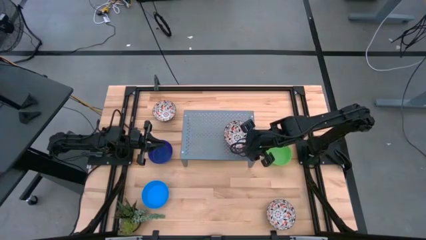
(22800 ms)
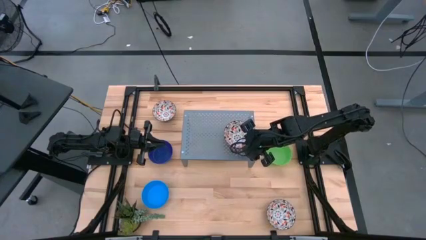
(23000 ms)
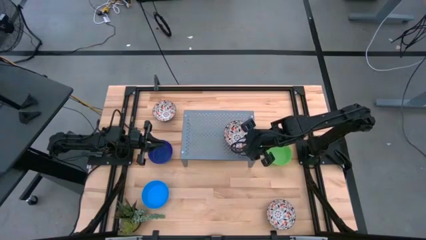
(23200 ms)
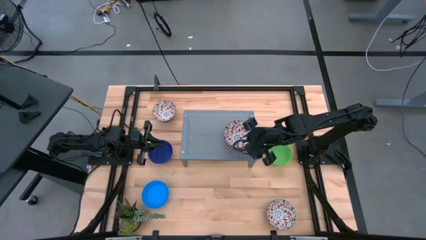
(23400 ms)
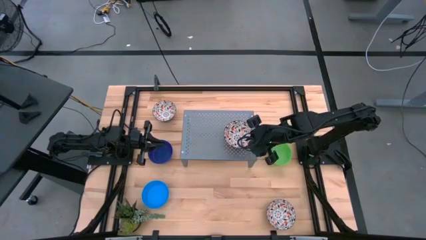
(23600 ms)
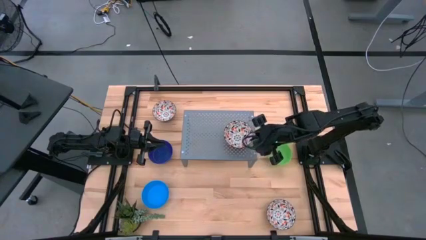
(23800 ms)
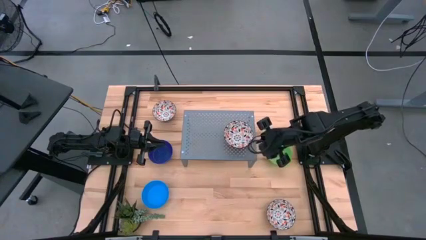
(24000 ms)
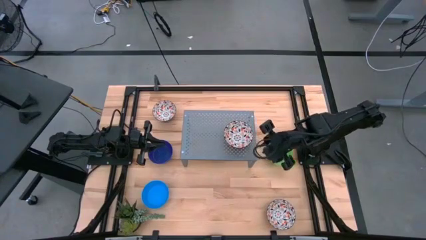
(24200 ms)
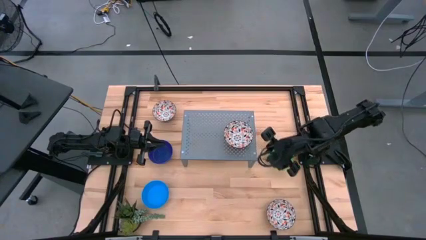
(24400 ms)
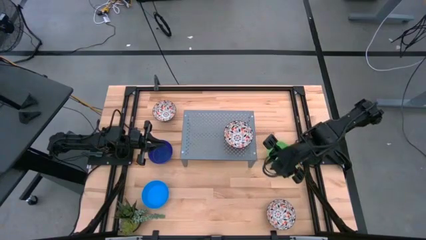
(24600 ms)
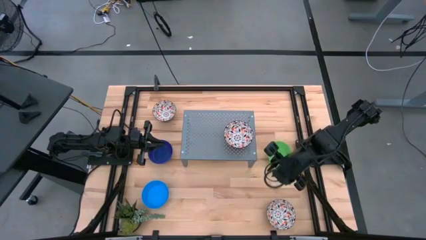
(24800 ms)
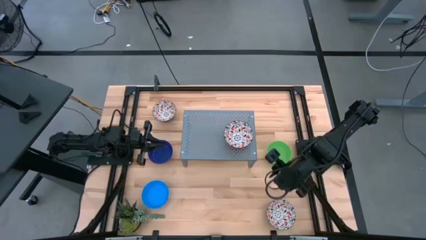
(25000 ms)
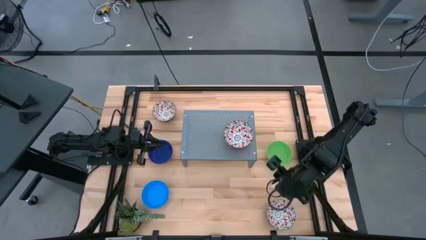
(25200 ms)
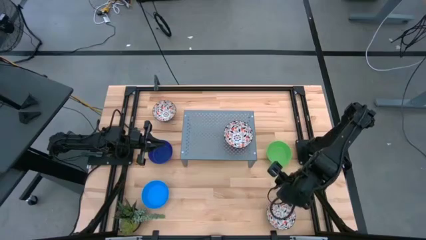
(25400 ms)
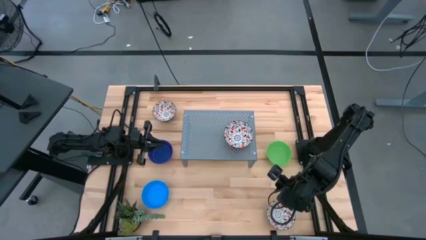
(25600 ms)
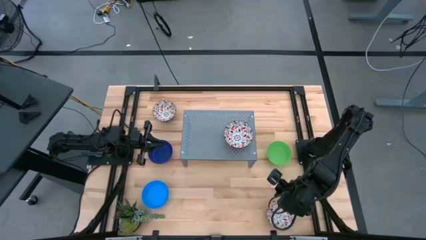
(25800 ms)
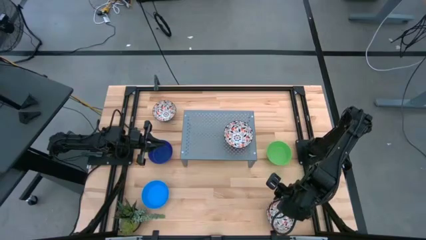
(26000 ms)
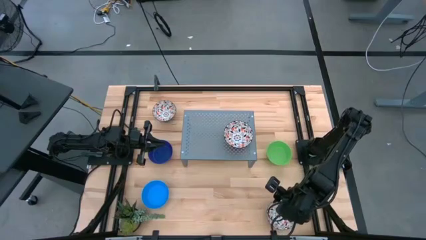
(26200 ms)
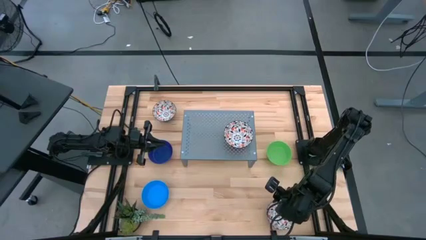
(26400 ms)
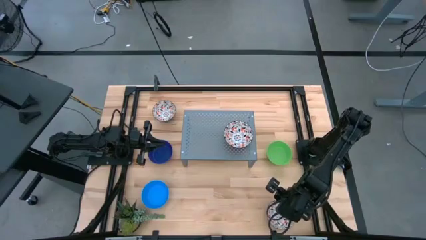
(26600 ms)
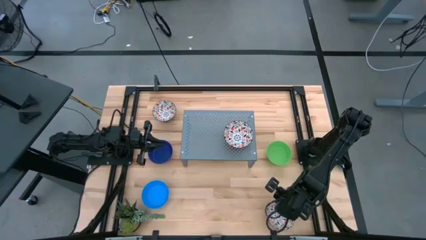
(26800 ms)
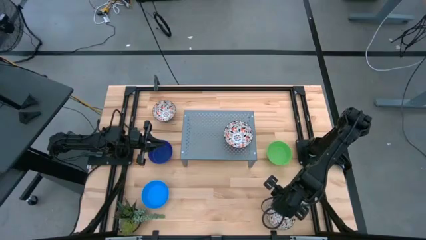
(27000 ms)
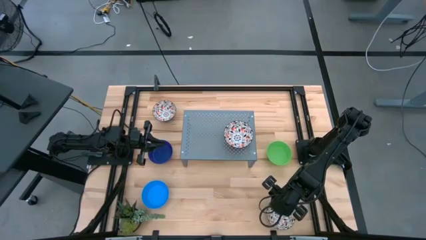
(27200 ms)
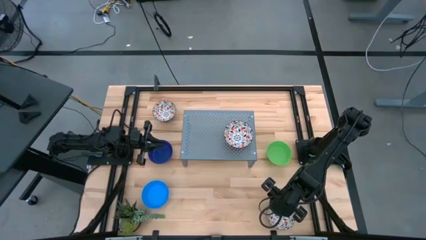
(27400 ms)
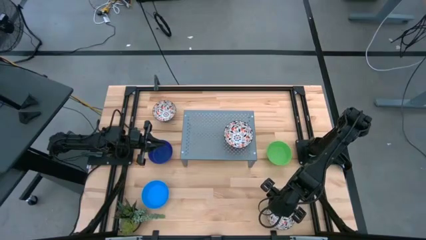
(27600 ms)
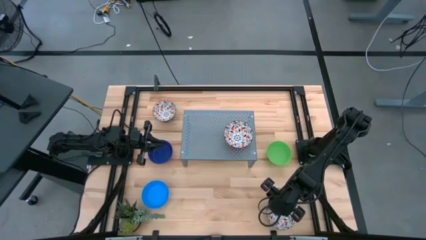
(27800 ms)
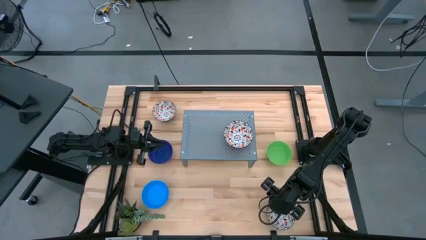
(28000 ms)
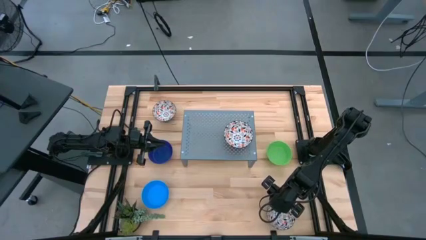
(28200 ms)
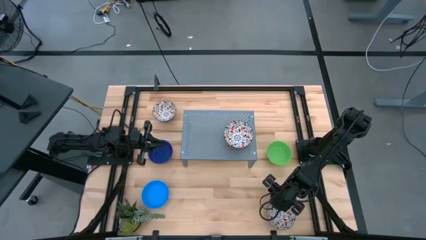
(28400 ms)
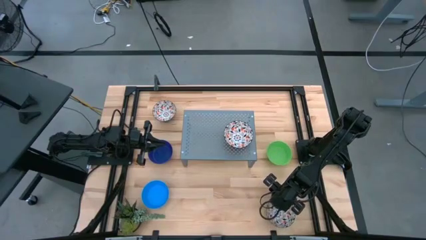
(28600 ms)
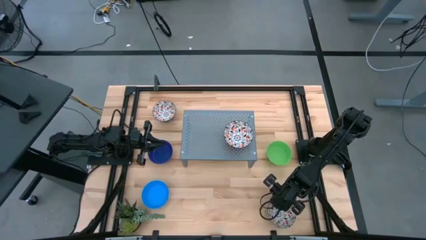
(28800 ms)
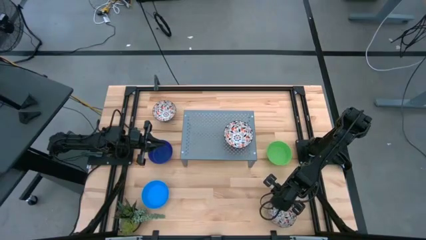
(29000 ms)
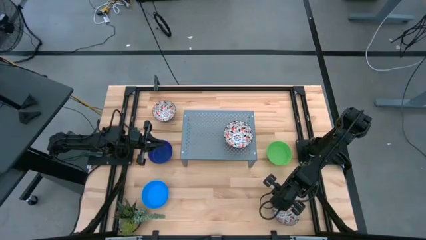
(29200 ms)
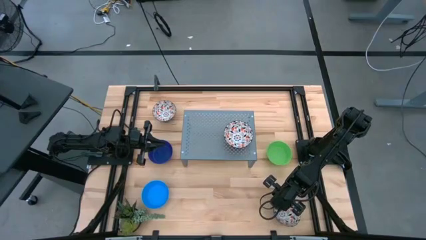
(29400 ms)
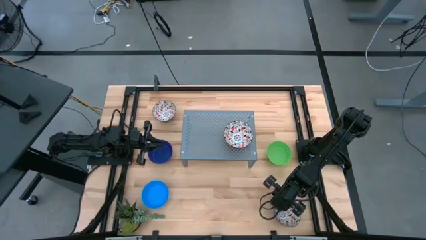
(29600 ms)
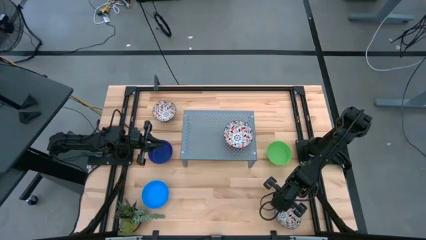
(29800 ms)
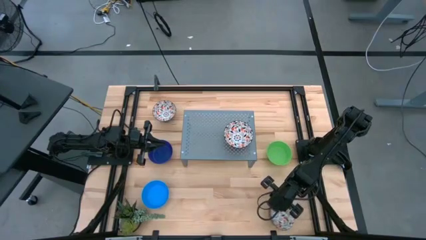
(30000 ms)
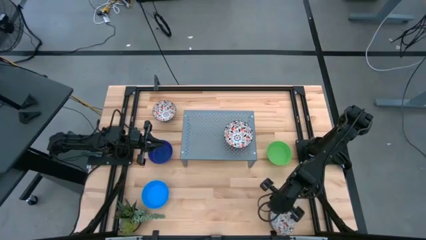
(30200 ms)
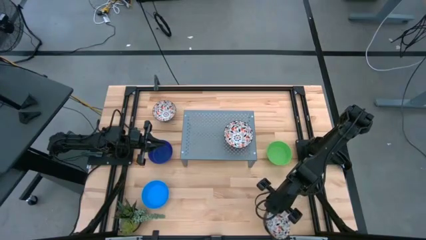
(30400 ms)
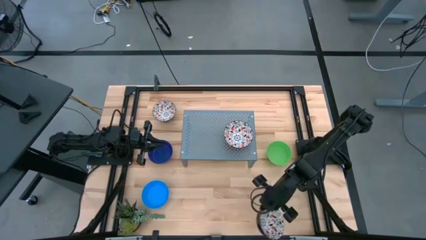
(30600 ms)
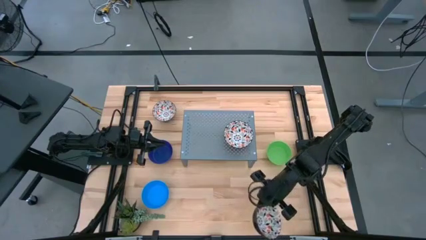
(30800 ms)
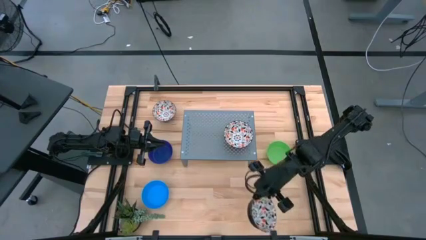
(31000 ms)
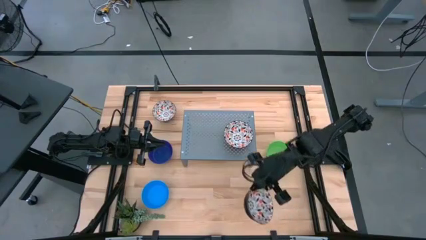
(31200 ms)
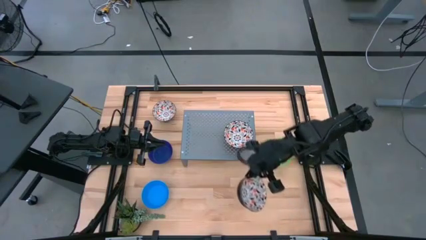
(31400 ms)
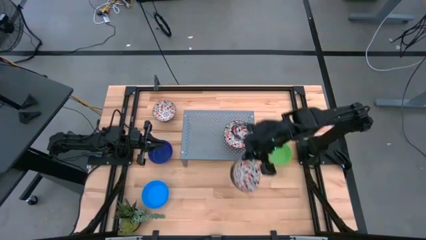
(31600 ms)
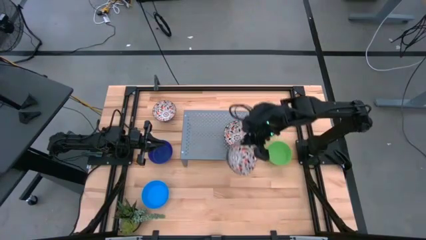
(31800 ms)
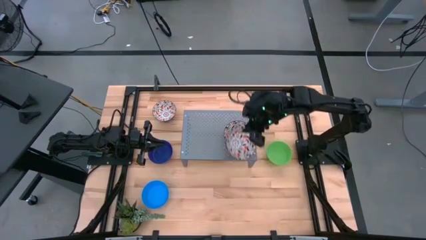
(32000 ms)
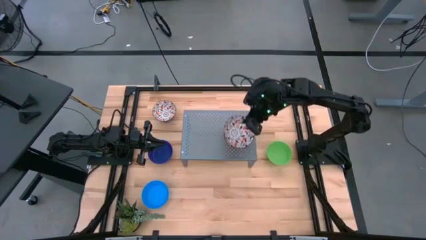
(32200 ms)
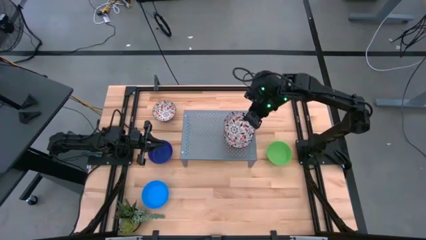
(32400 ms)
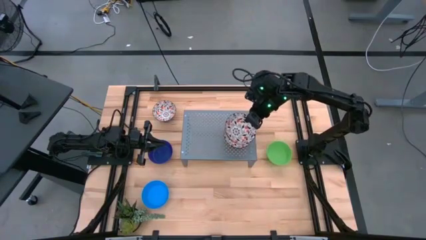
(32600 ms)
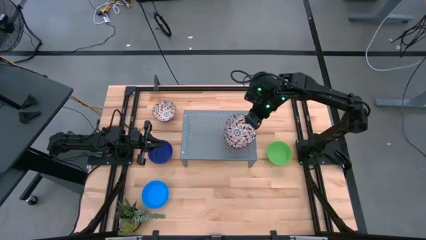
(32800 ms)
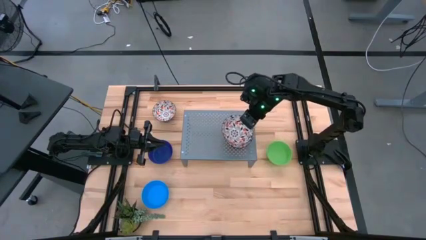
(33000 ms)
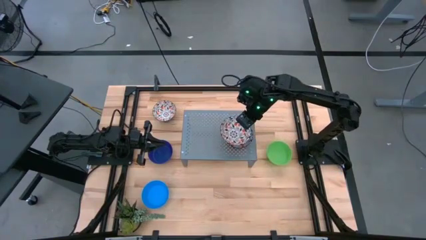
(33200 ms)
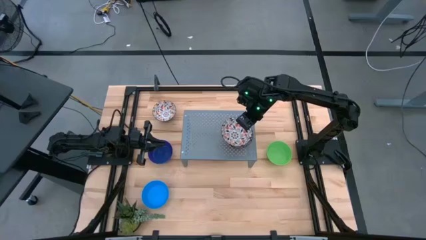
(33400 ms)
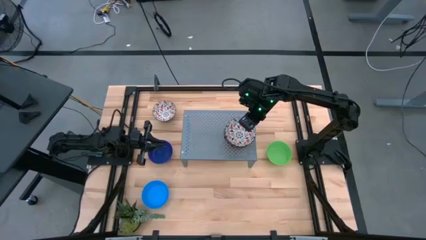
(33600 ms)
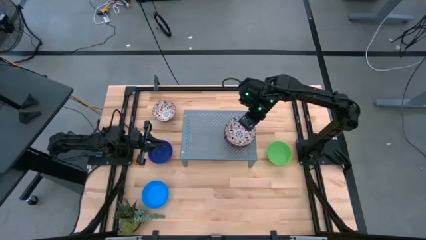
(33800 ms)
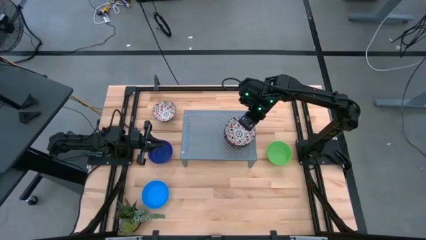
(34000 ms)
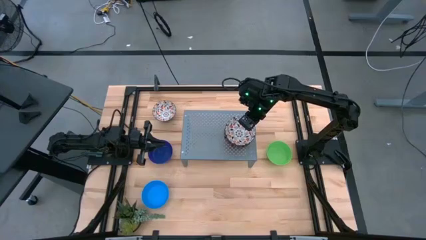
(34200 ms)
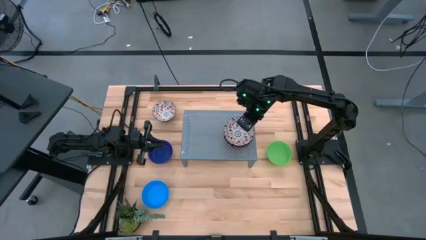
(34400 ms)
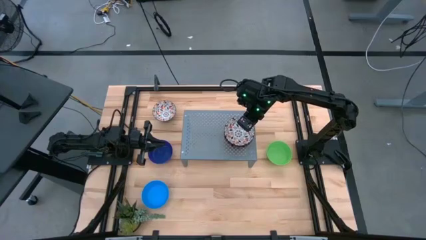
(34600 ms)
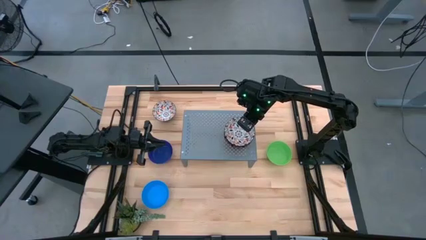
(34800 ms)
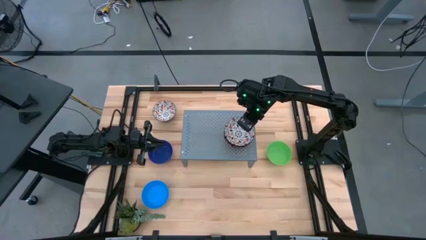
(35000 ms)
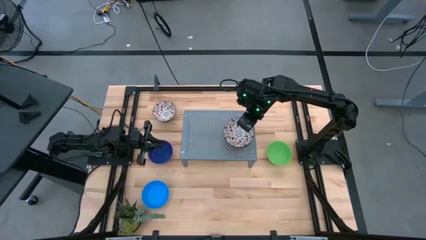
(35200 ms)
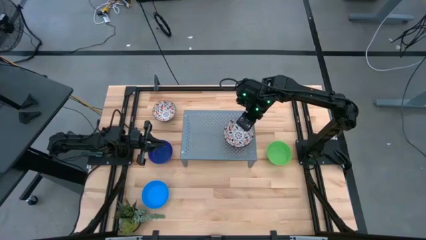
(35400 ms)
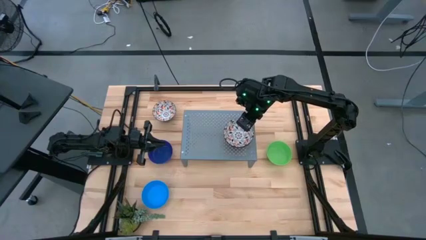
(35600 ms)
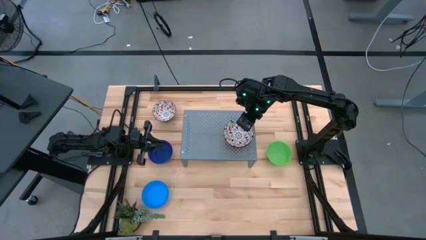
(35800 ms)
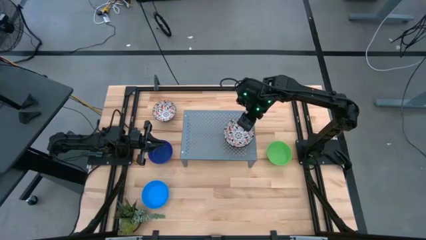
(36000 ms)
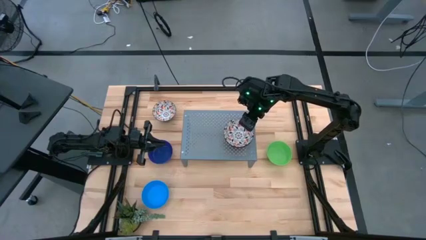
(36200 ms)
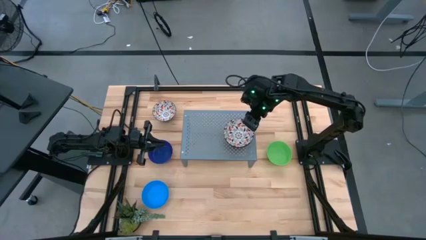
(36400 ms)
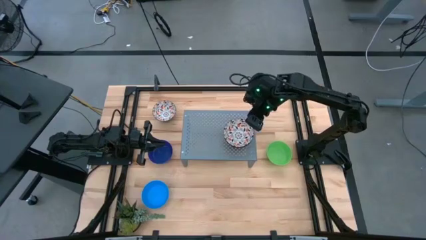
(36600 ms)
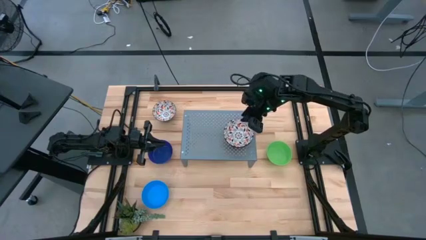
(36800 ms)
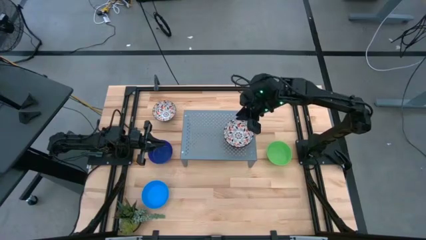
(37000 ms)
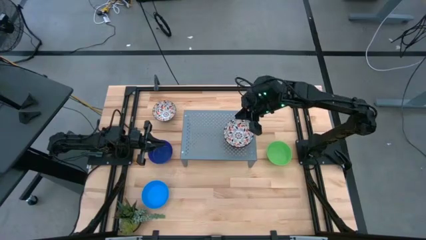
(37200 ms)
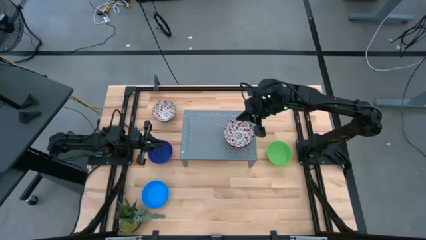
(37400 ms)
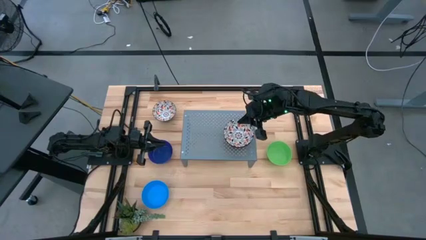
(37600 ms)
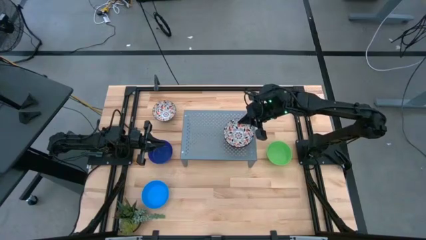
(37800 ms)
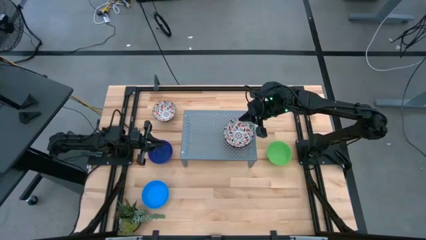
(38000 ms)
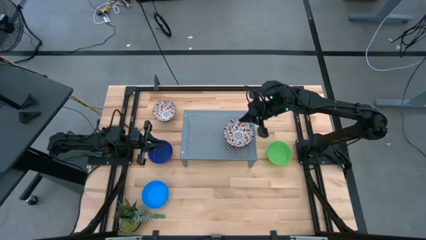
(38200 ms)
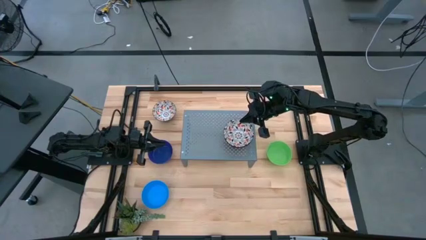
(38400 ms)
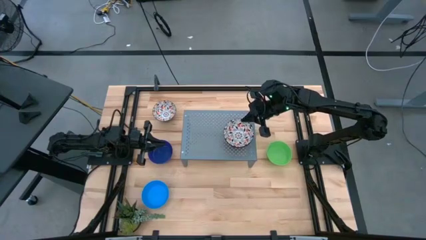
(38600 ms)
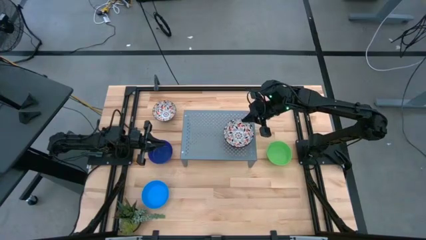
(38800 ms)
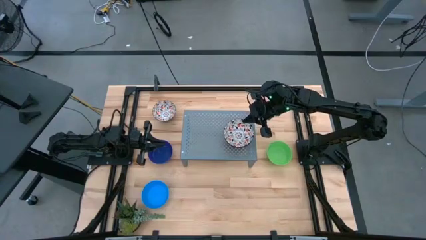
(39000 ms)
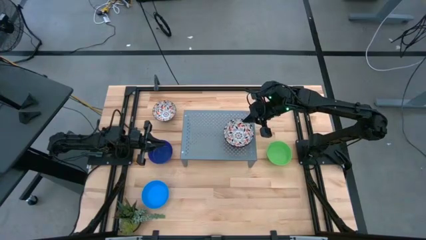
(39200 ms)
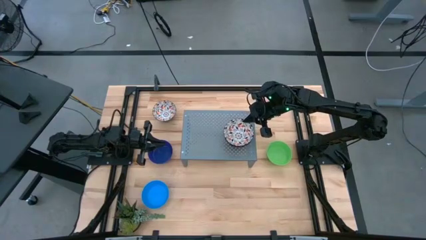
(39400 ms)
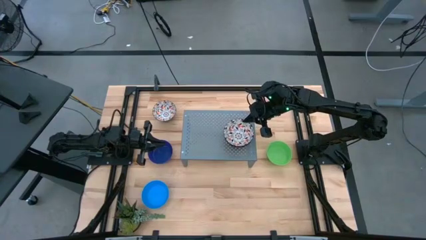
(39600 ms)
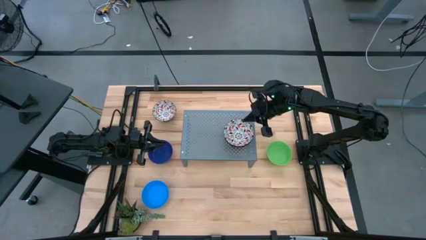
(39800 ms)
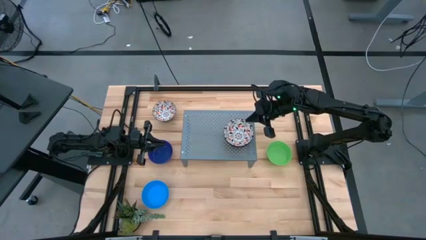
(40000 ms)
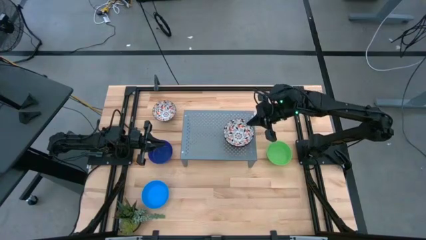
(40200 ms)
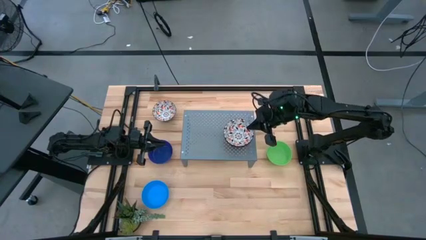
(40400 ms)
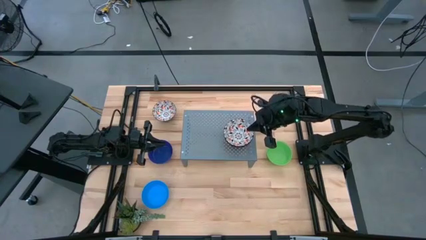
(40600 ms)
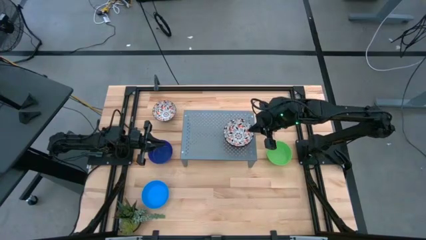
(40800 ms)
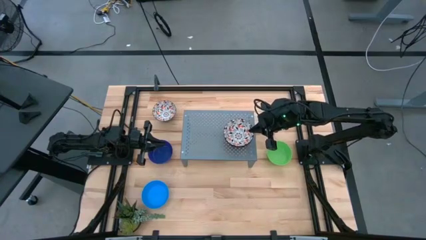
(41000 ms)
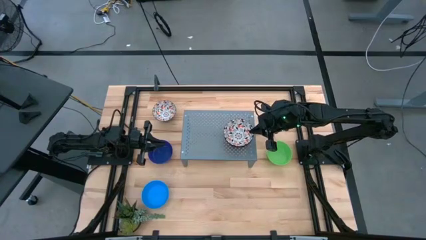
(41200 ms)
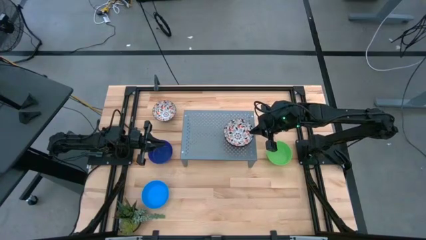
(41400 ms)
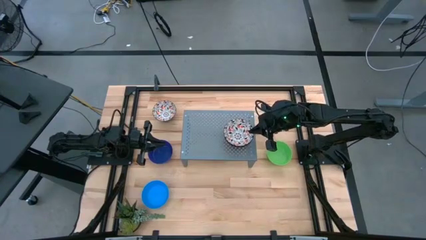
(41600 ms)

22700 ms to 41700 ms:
Task: Pick & Place Mini bowls
Stack the bottom white patterned bowl on top of the white patterned bowl on the shelf
